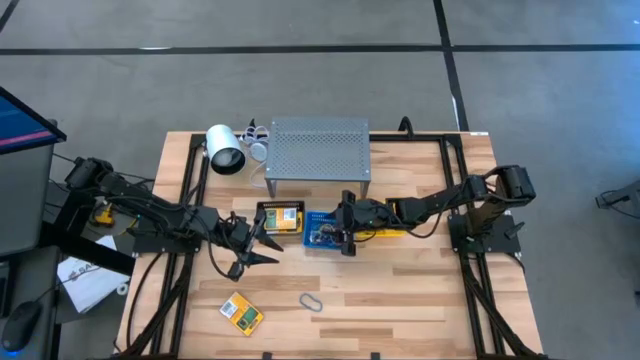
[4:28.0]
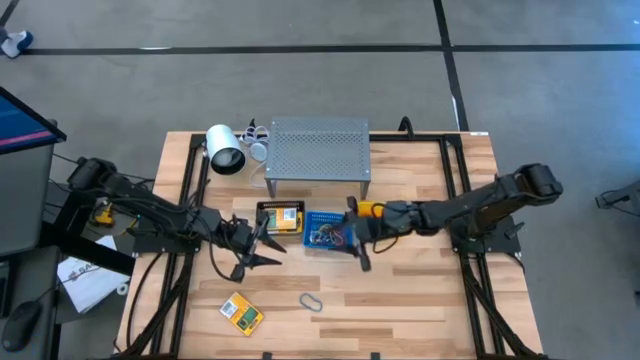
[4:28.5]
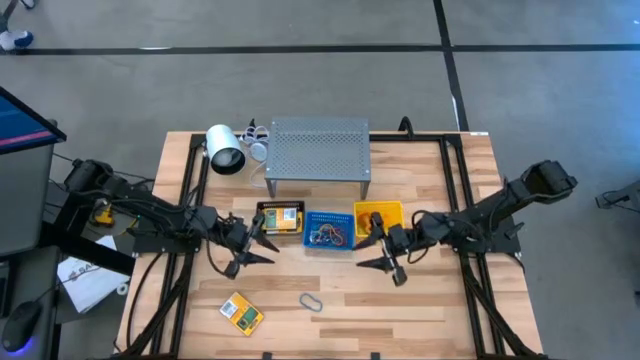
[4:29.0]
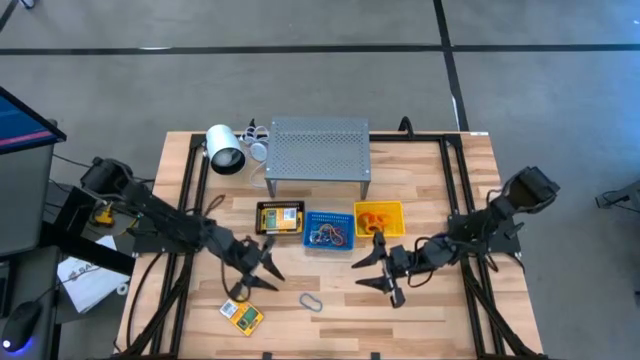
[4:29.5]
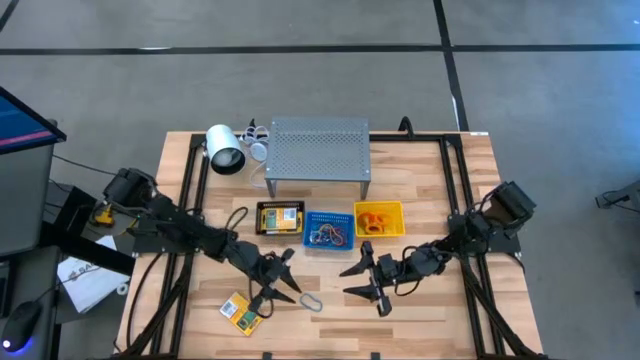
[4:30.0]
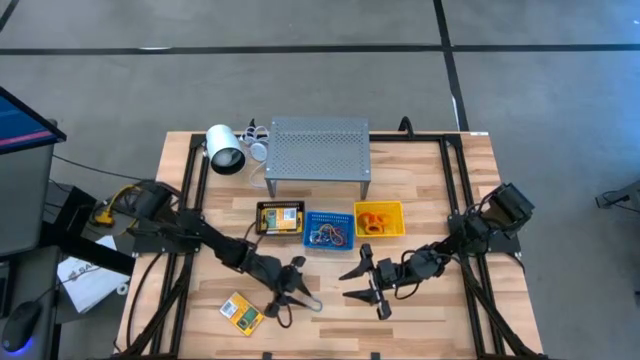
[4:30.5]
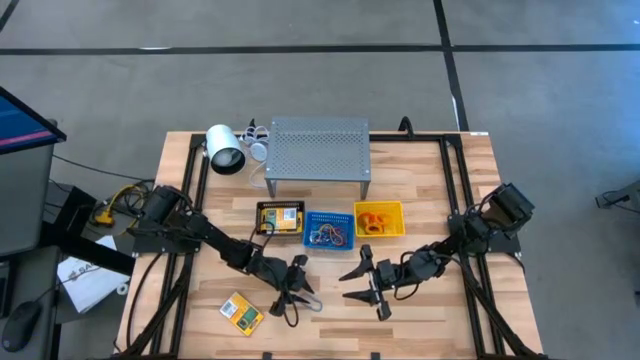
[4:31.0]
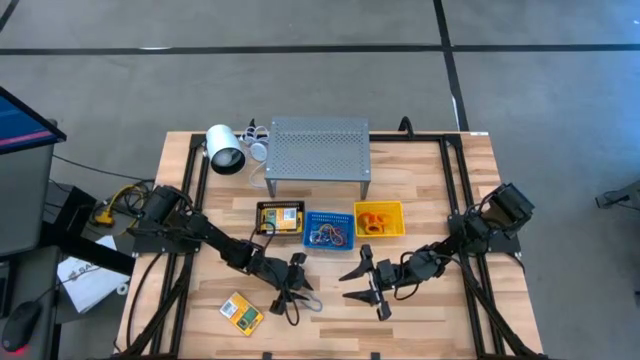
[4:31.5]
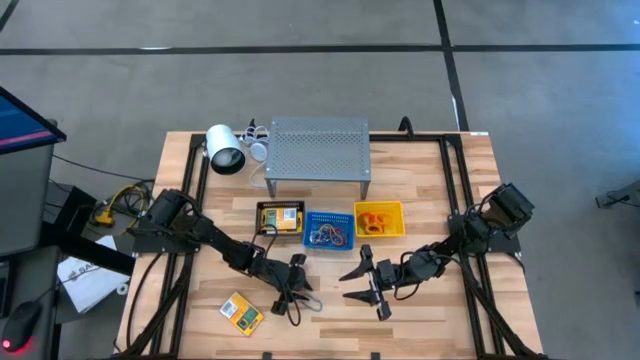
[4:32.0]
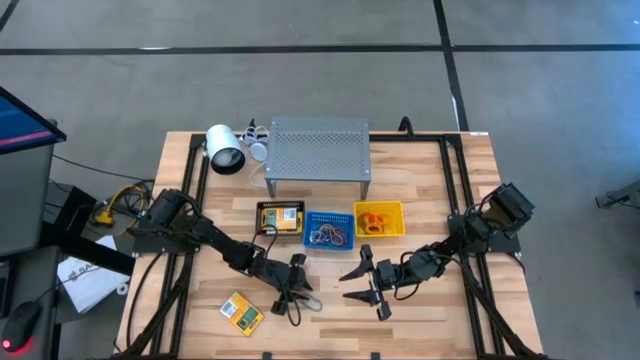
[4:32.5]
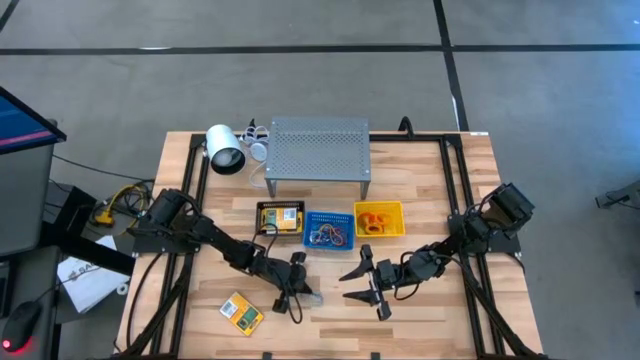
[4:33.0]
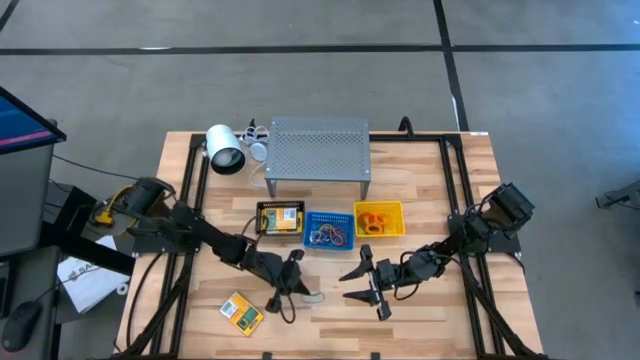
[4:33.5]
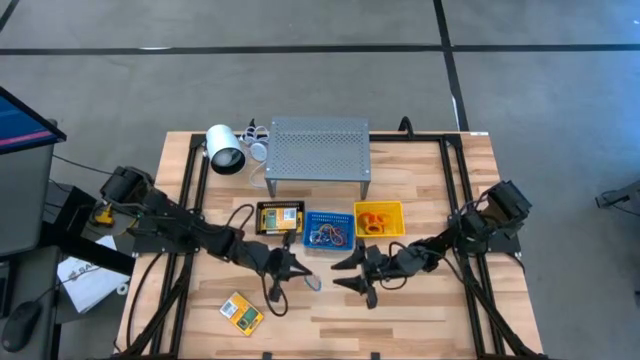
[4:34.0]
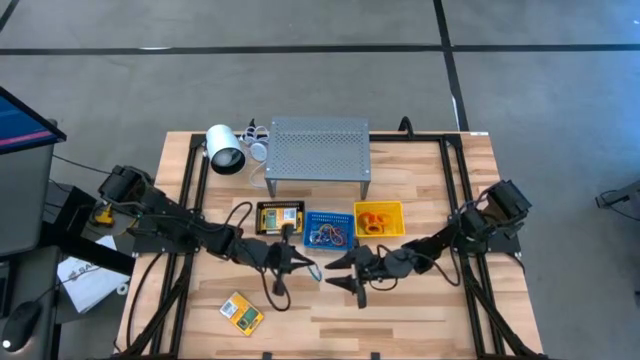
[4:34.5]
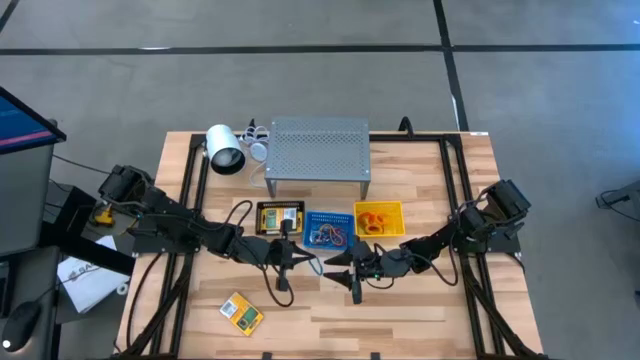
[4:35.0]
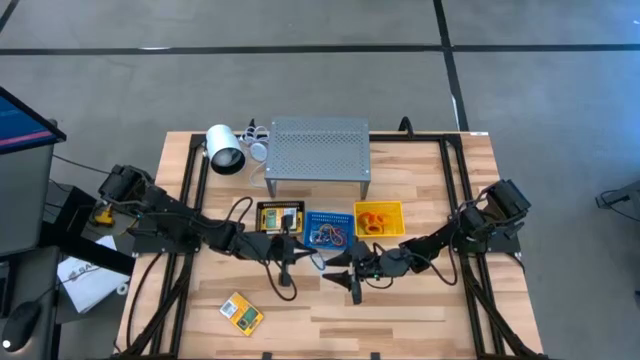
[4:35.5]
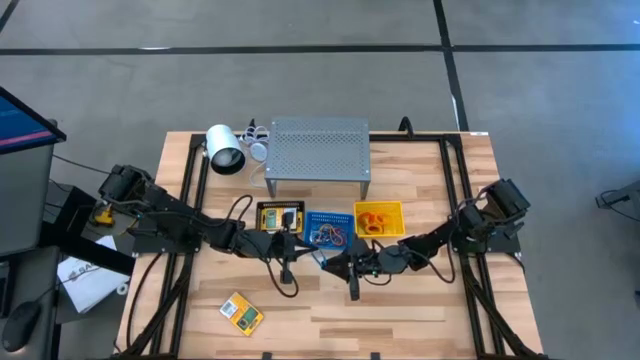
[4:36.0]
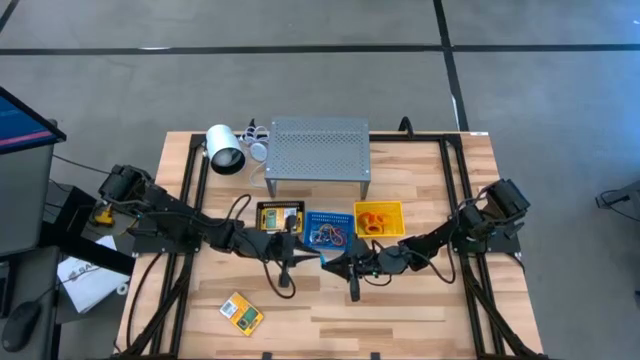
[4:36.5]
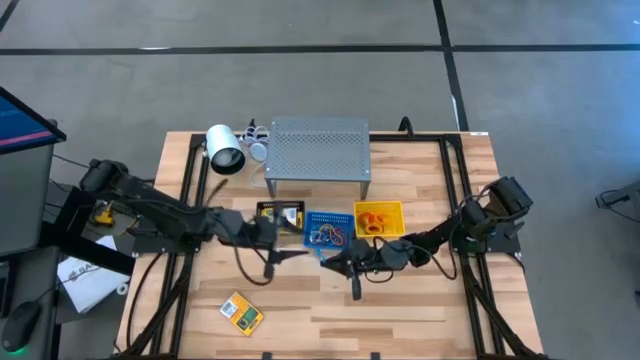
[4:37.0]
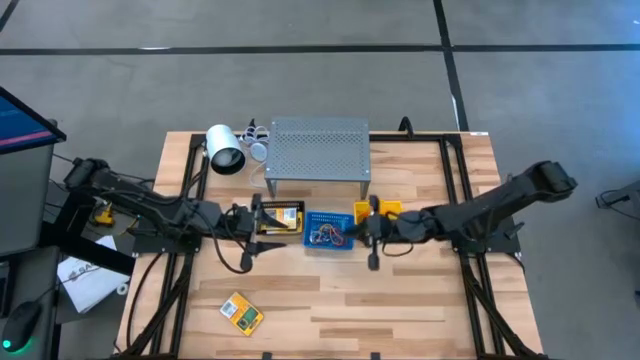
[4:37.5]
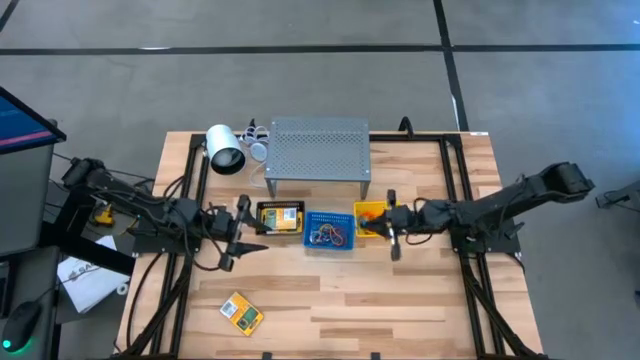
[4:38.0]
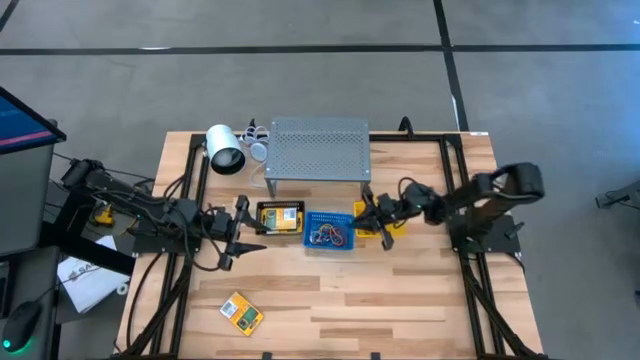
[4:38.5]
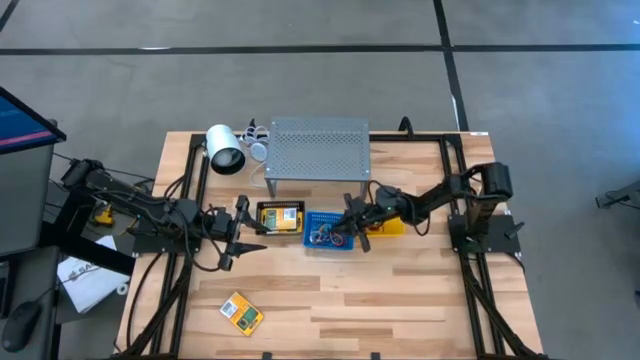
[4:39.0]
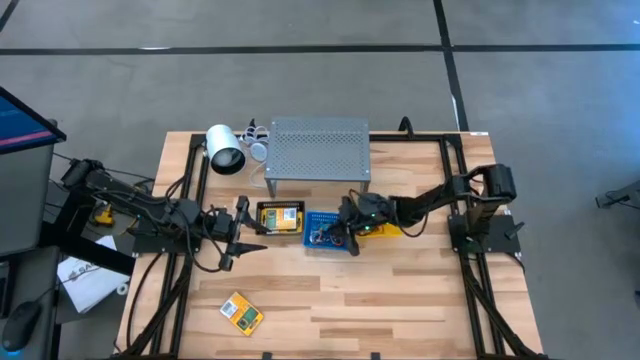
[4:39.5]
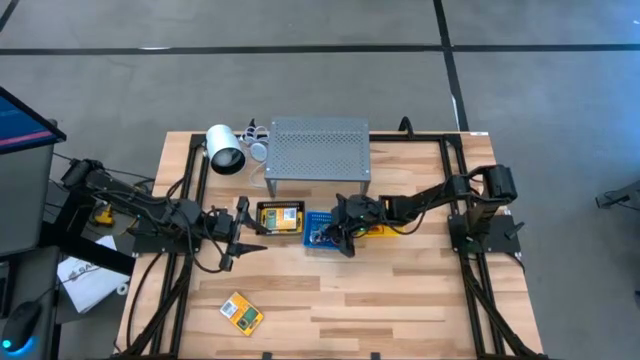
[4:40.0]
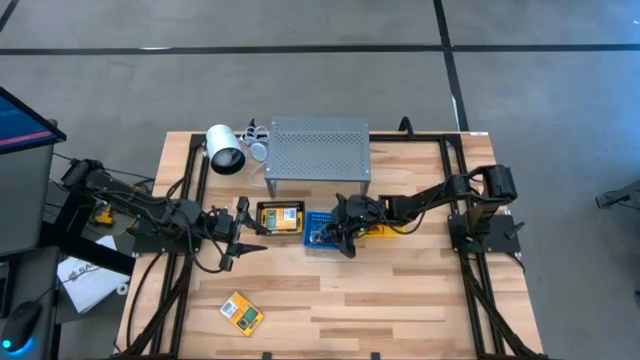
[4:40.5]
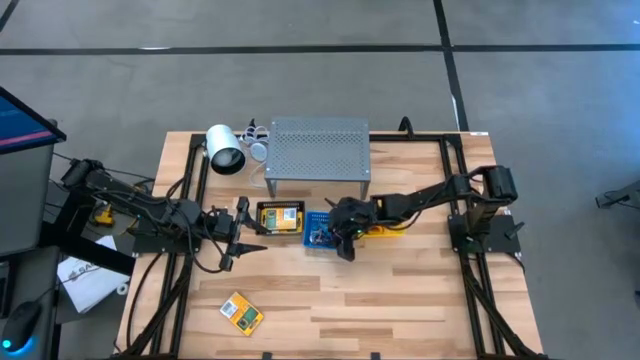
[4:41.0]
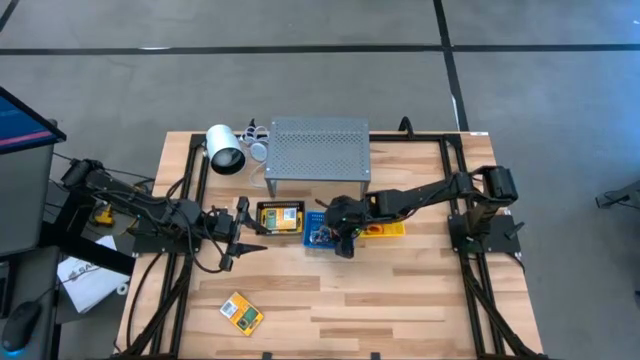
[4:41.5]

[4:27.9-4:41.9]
Task: Pick & Place Office Desk Supplies
Put the blue rubber band into the blue bin

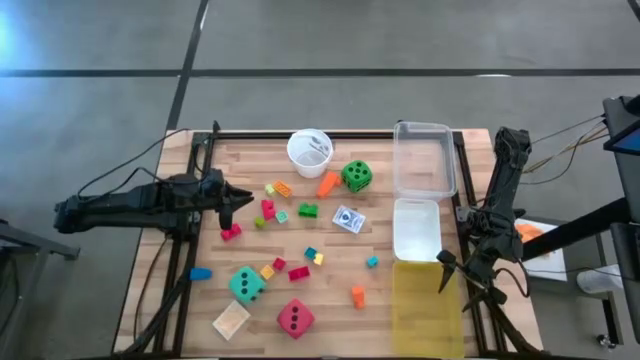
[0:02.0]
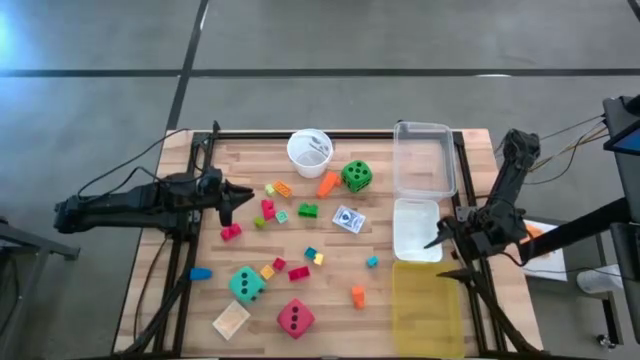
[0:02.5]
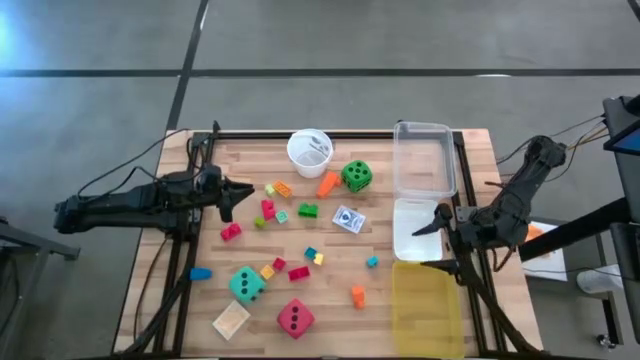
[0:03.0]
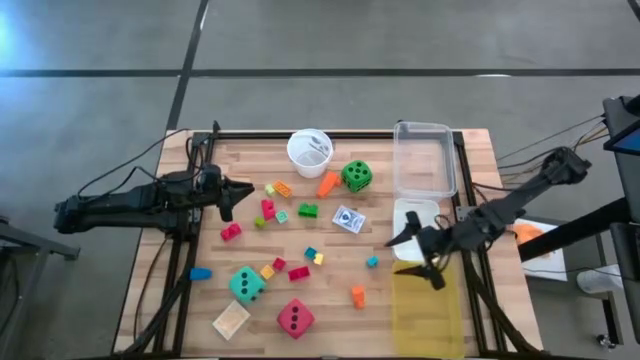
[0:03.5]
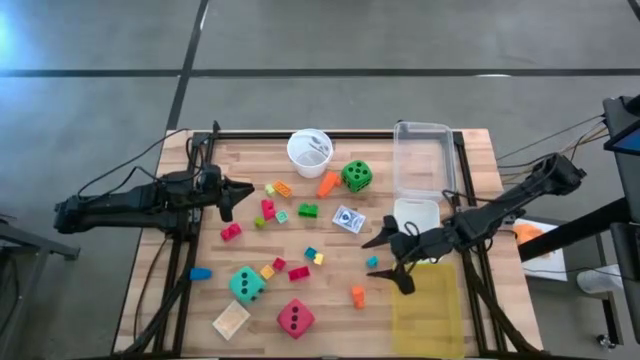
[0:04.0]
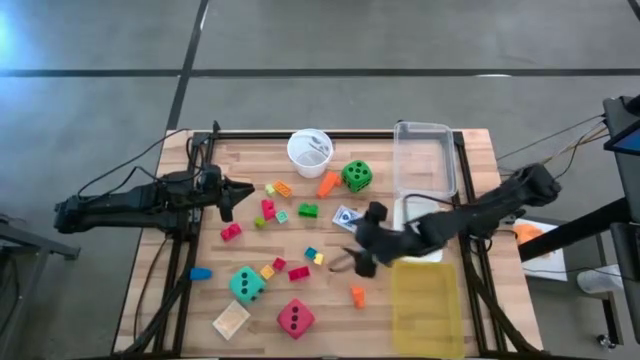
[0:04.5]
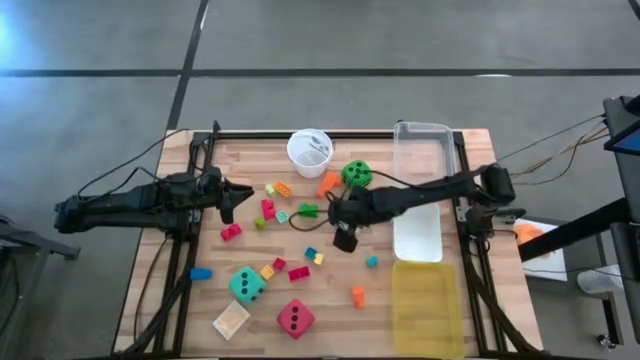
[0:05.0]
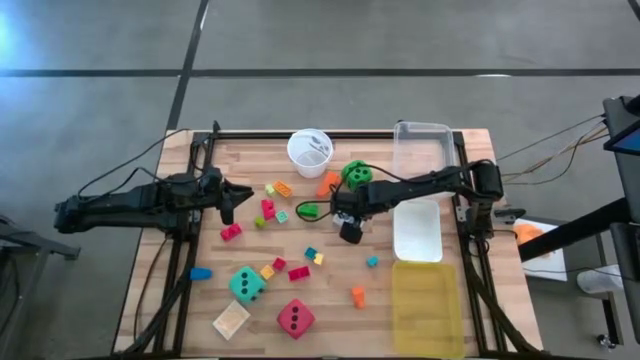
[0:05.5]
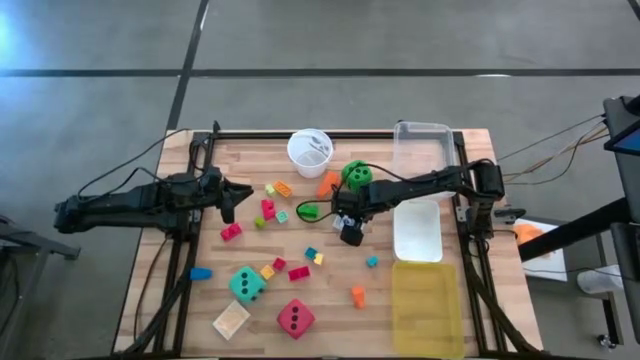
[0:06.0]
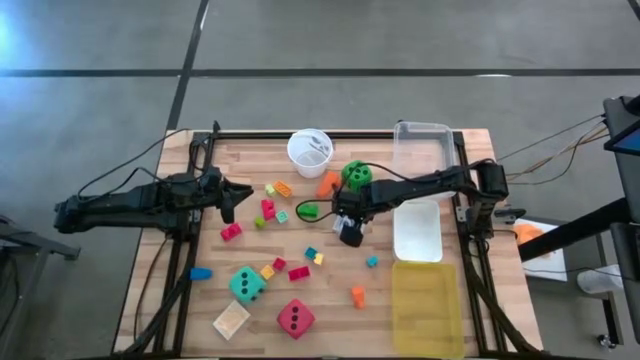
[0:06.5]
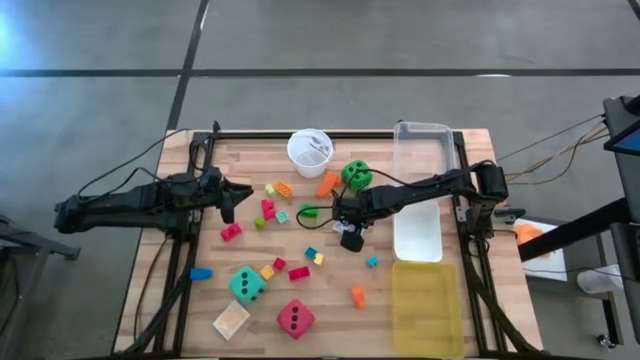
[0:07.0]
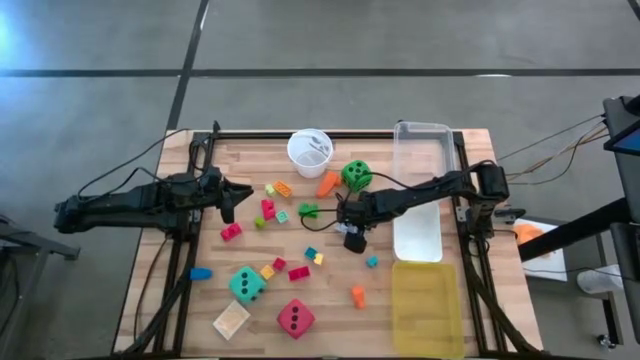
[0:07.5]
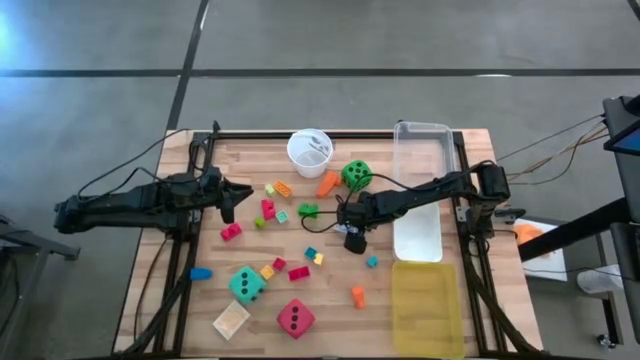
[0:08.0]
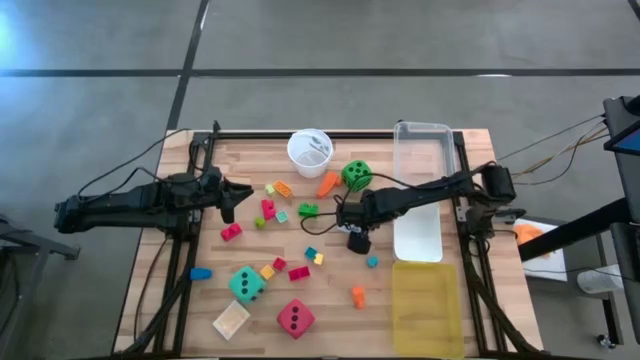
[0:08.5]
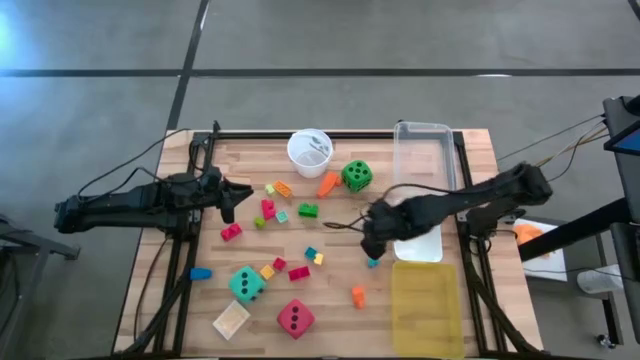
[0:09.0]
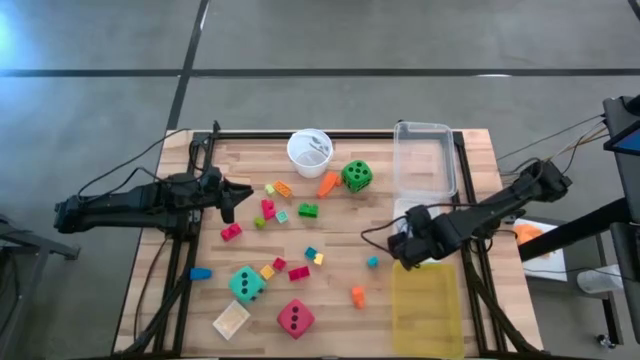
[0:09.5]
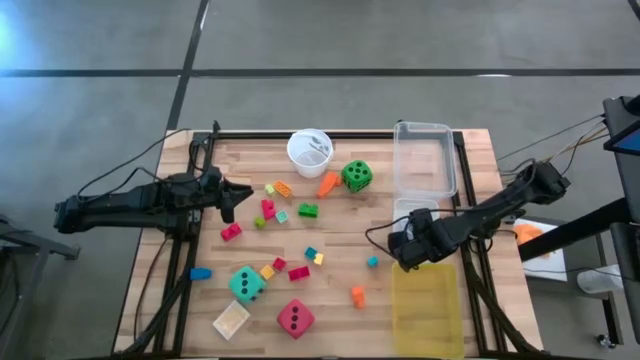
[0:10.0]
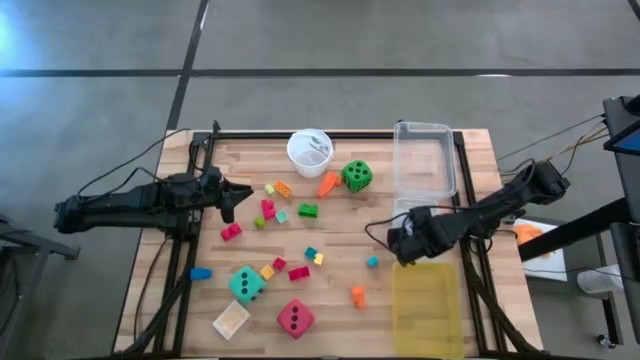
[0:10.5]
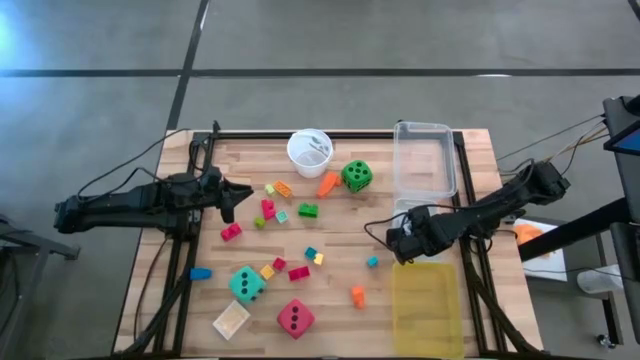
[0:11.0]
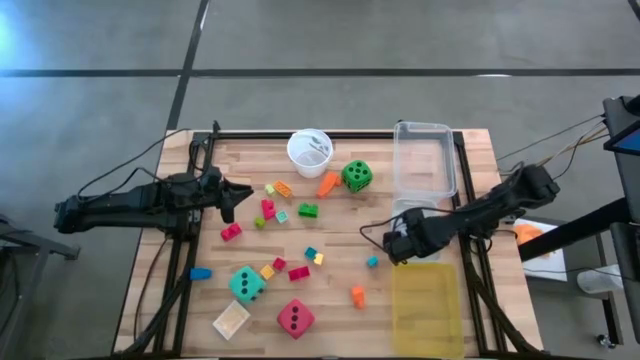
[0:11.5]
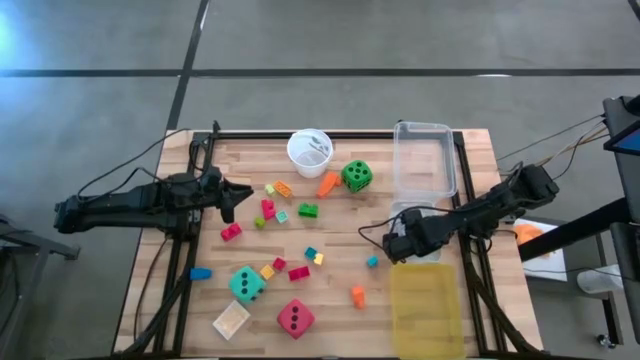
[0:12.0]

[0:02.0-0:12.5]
Task: Pick & Place Toys
Put the blue deck of cards into the white bin
